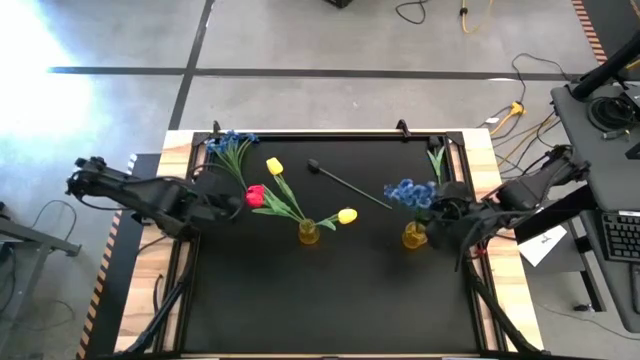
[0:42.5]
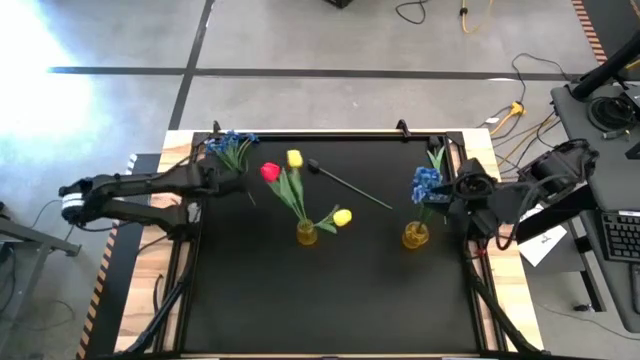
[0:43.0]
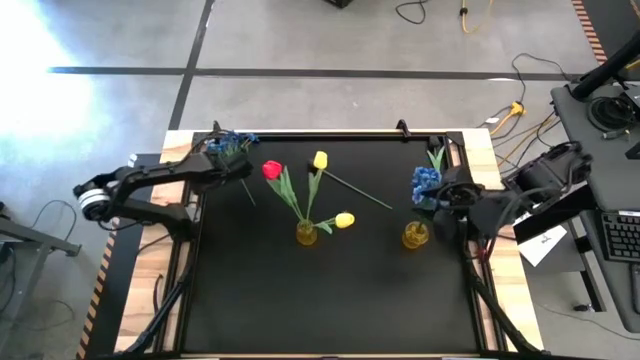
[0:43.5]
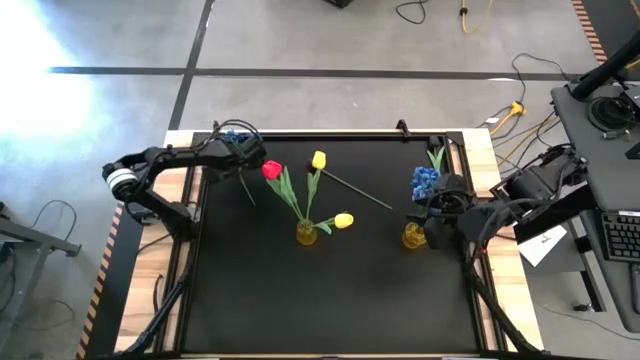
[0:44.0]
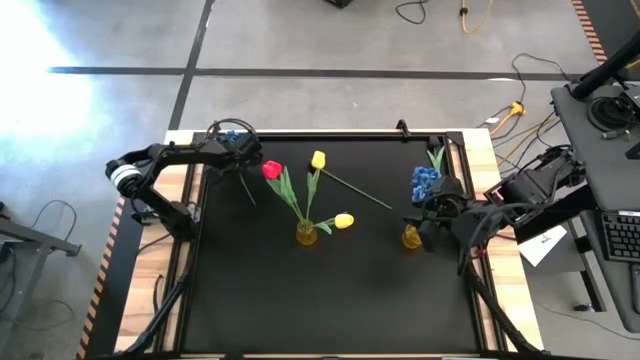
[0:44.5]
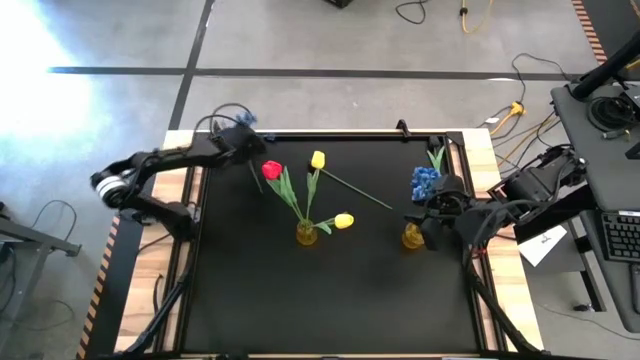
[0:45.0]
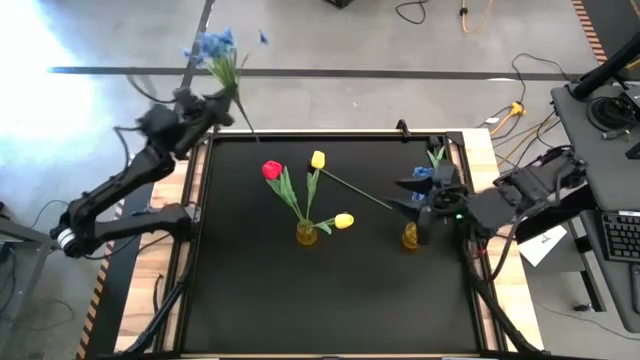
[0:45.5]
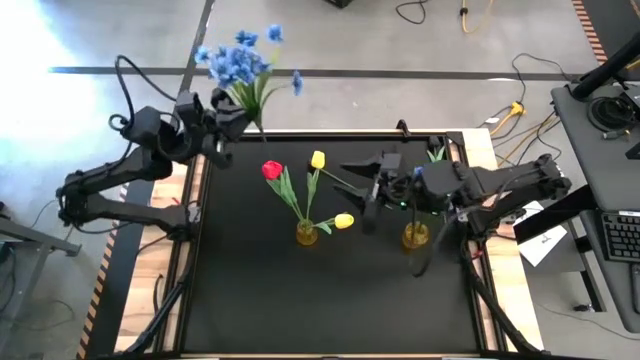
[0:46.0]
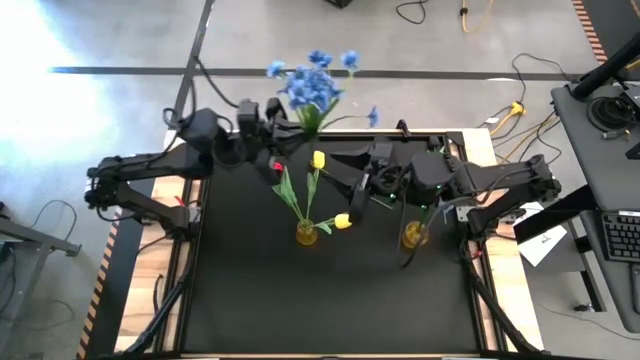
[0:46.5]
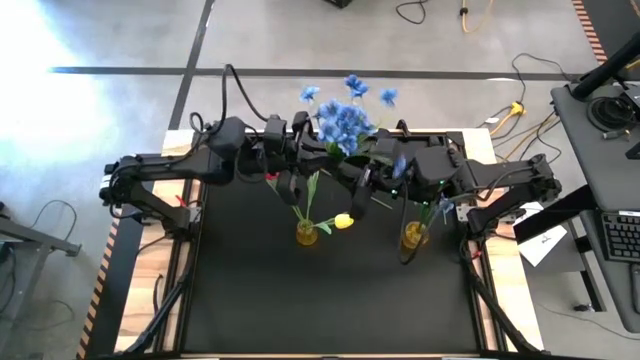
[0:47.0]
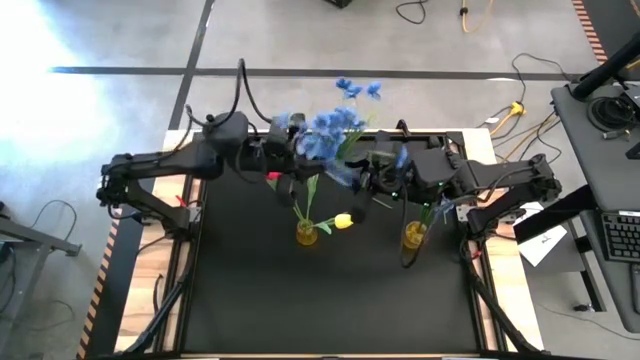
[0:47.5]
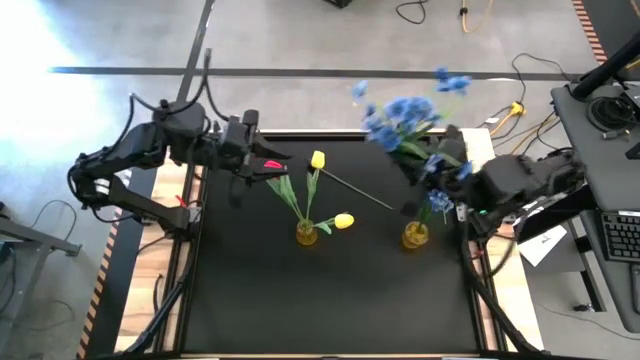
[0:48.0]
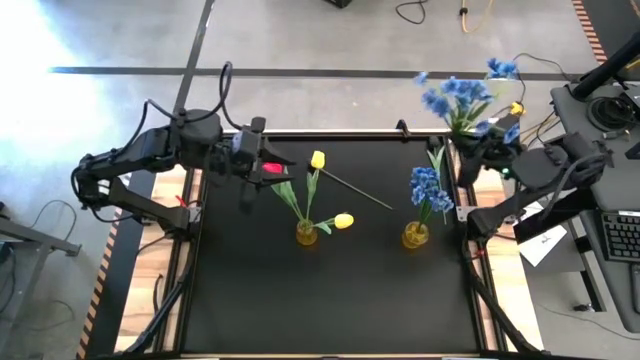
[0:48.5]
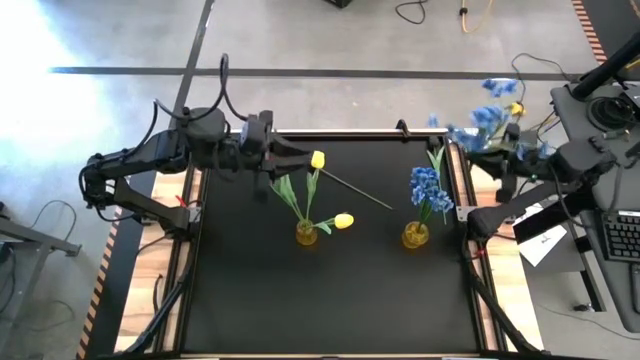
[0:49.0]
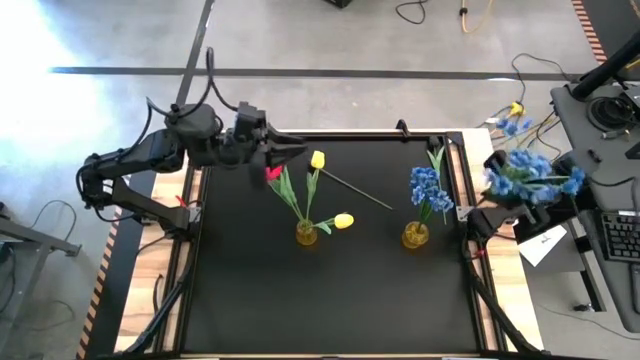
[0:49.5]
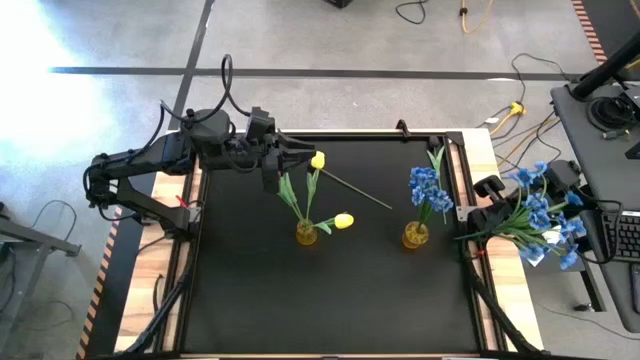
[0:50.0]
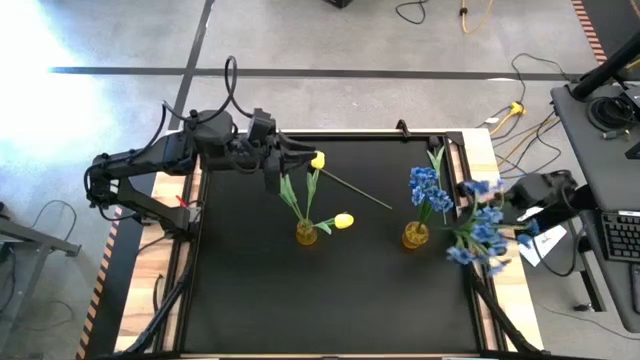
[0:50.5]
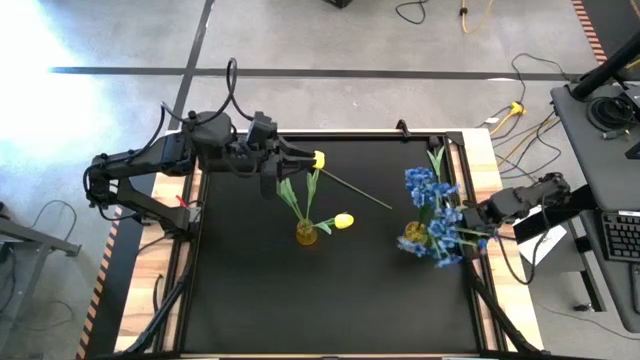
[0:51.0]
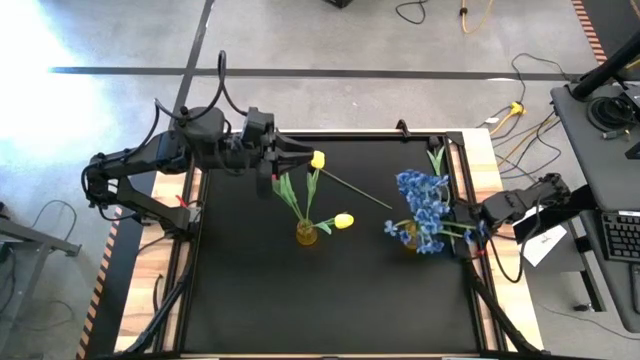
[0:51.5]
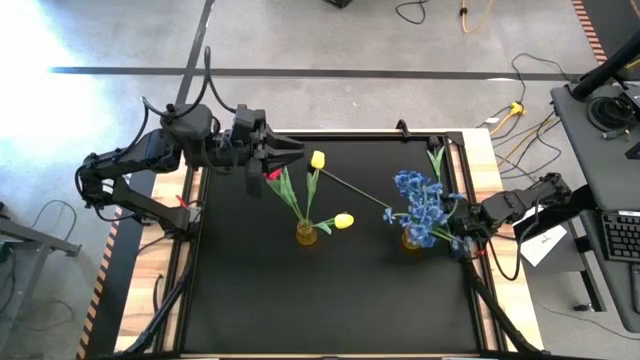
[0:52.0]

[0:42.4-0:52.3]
Task: Sort flowers into vase by color
Put the blue flowers into the right yellow vase

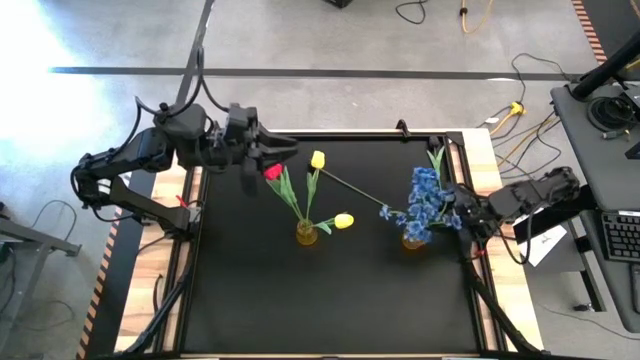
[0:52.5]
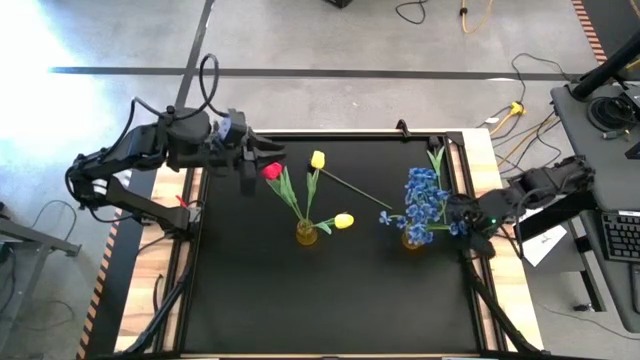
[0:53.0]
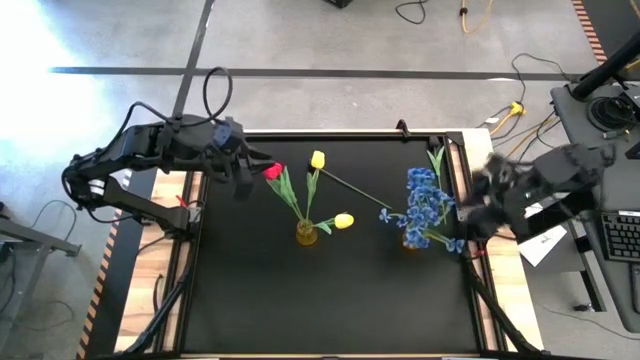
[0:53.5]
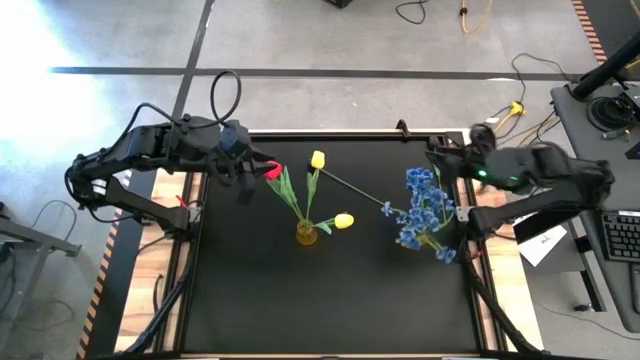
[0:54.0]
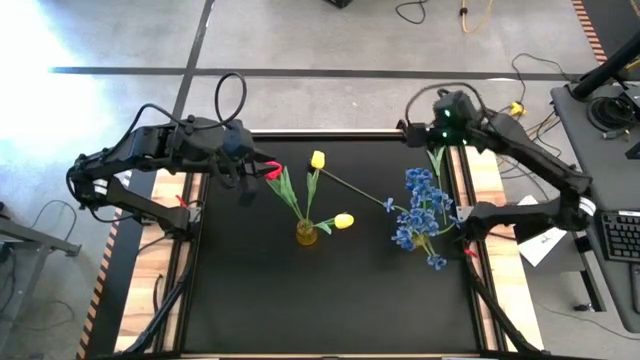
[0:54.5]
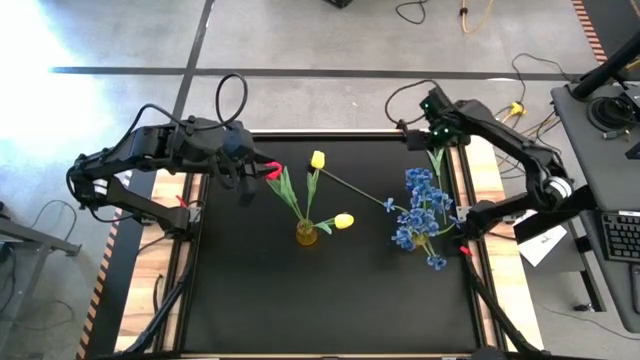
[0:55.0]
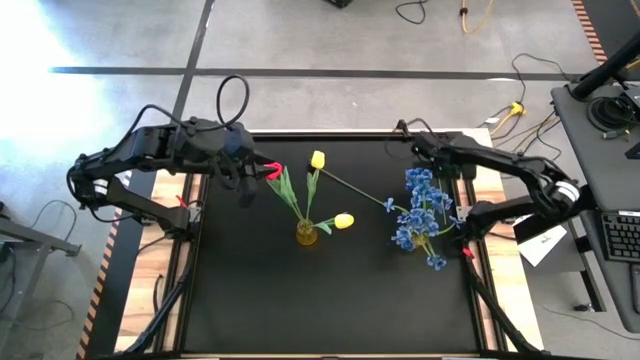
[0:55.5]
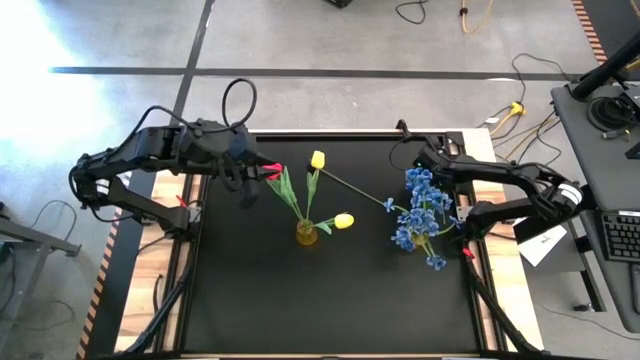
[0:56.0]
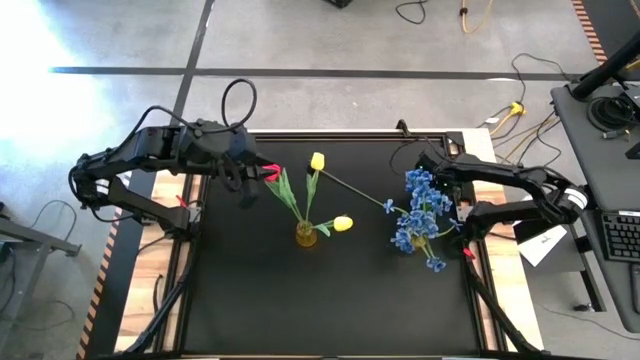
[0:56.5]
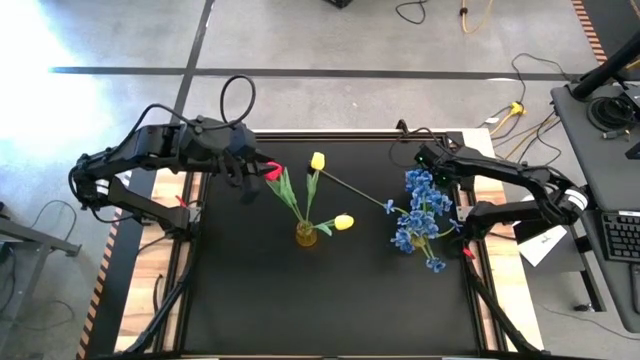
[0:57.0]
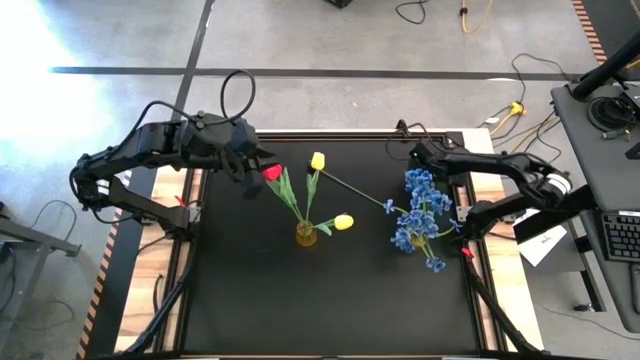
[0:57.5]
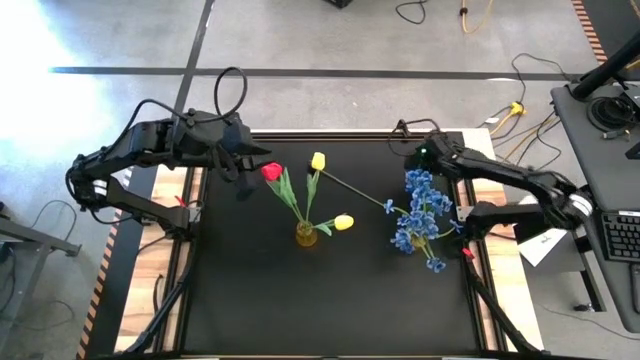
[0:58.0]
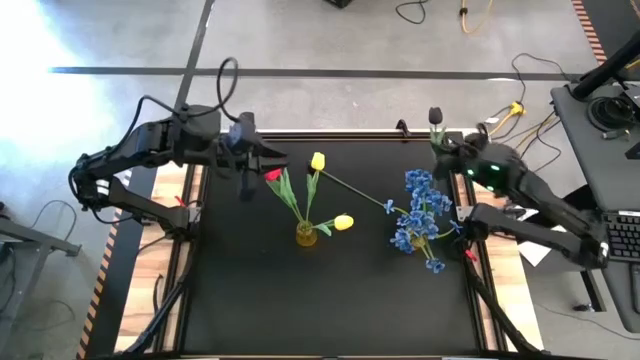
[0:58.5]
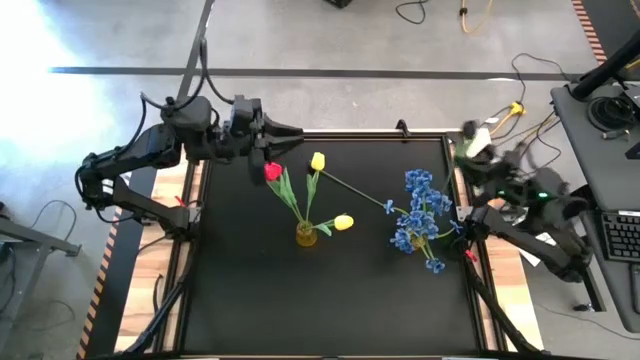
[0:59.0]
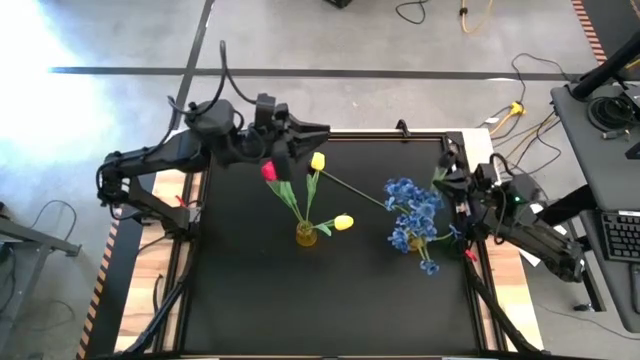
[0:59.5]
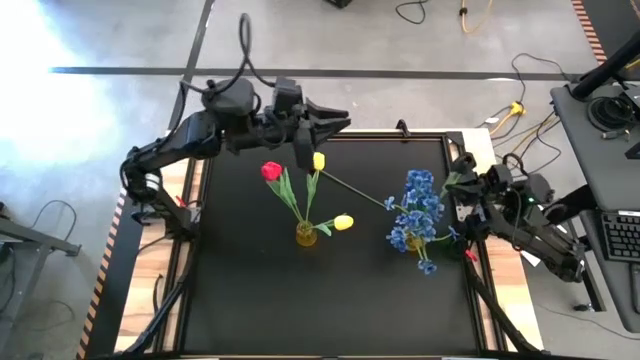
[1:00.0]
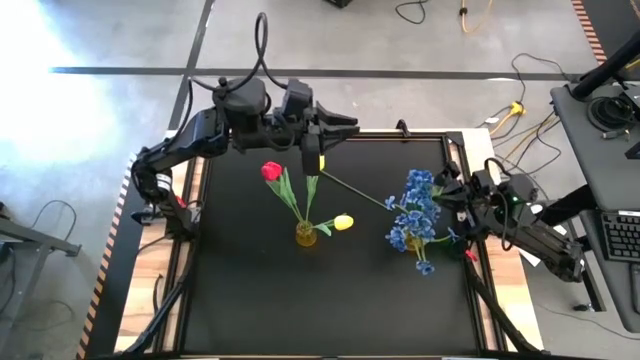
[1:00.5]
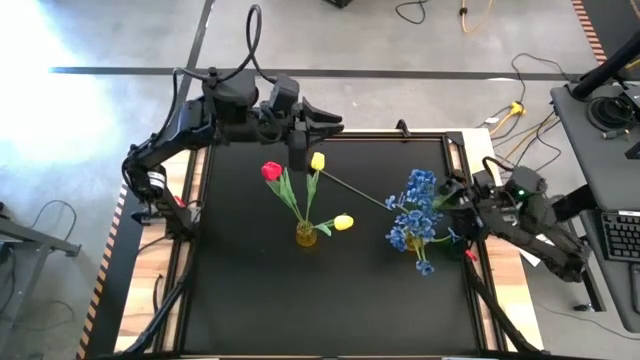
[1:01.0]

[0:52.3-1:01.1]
Put the right black flower into the right yellow vase

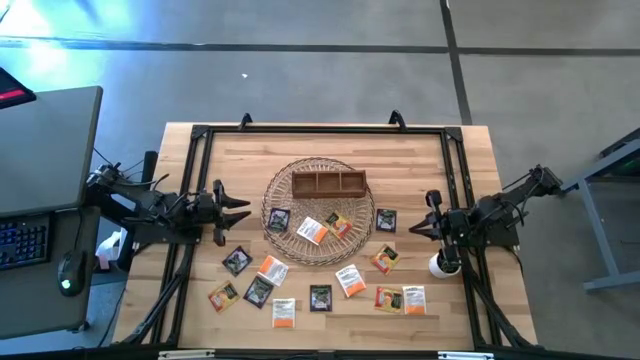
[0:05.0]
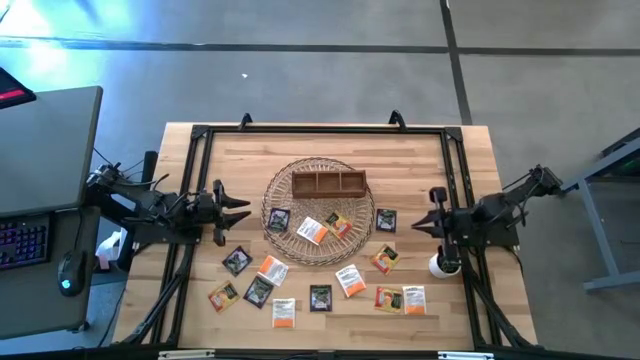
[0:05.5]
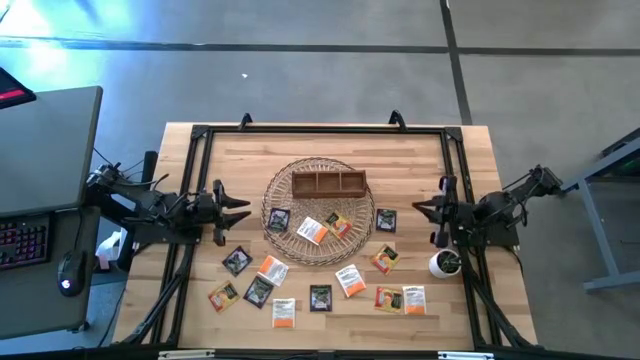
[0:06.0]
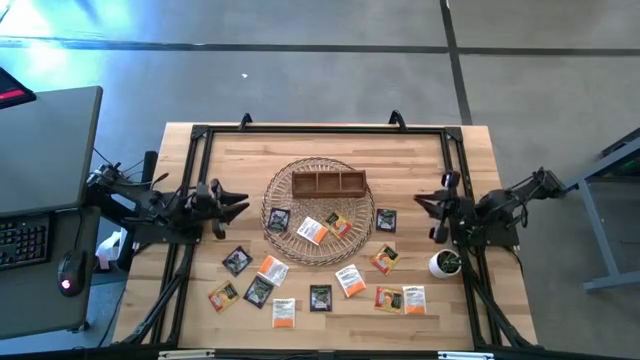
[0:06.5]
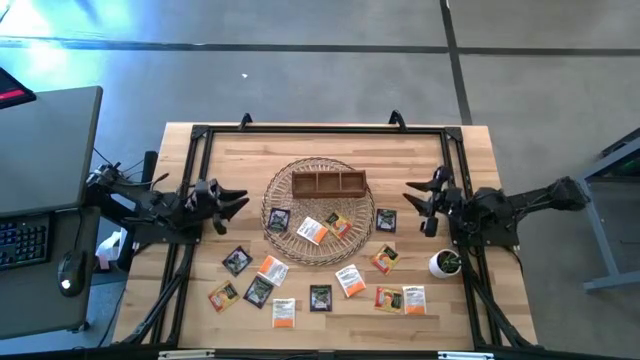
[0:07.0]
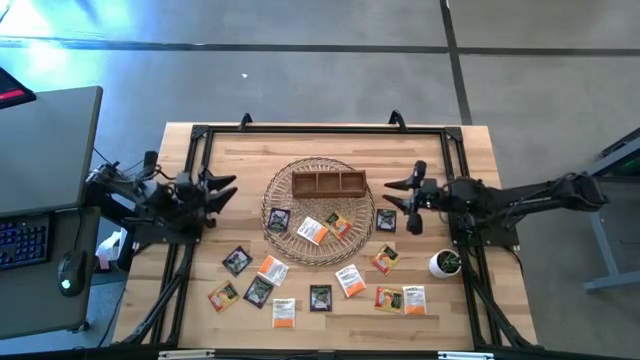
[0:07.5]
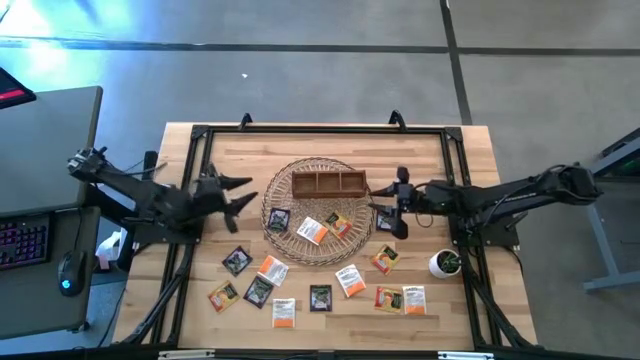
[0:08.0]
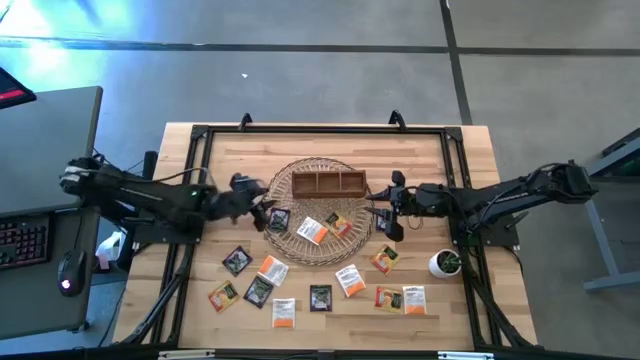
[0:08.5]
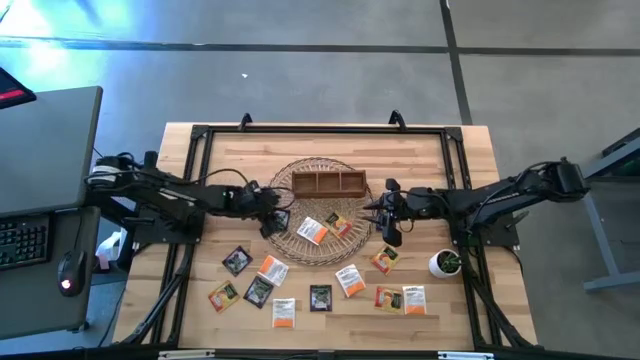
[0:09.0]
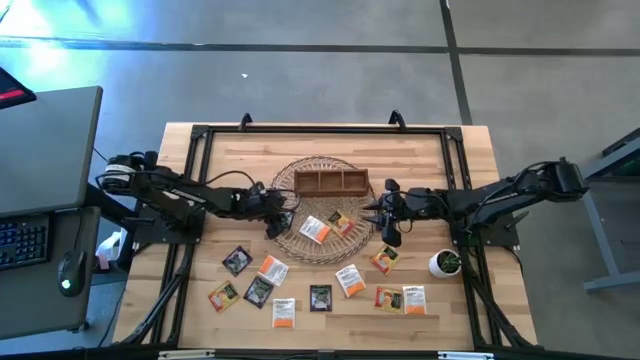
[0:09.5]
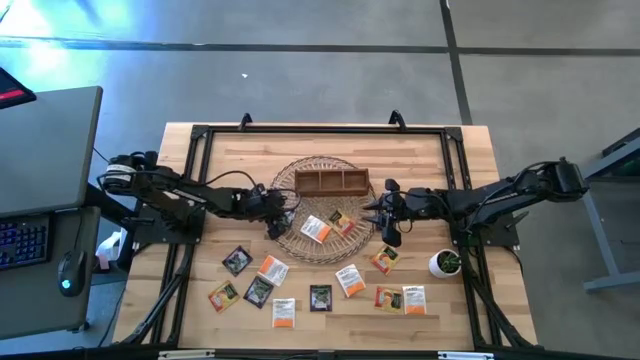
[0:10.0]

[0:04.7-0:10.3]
Task: Pick & Place Tea
Put the violet tea bag into the left section of the brown wooden organizer
